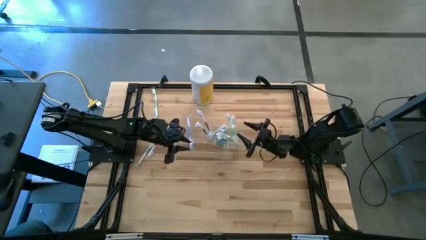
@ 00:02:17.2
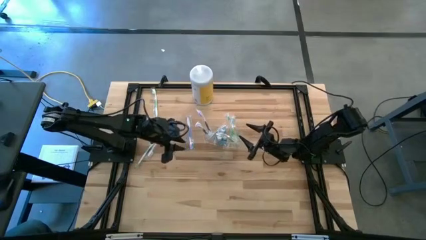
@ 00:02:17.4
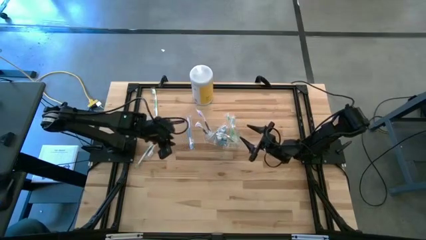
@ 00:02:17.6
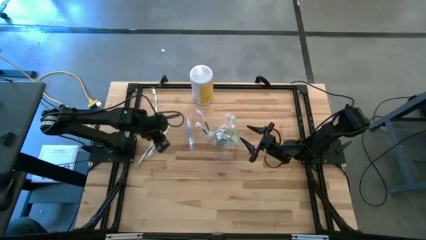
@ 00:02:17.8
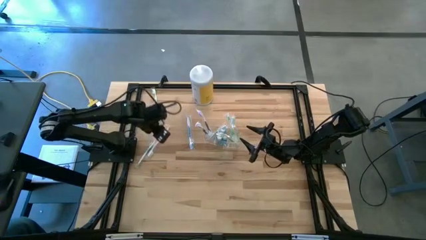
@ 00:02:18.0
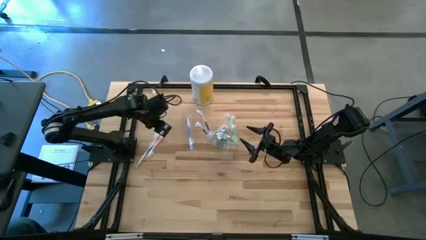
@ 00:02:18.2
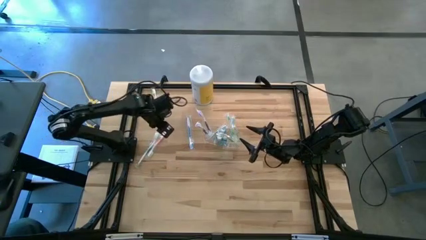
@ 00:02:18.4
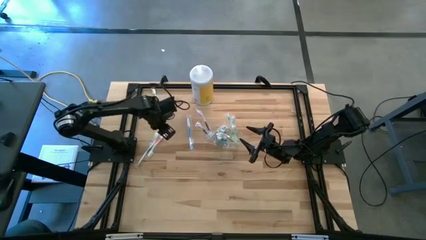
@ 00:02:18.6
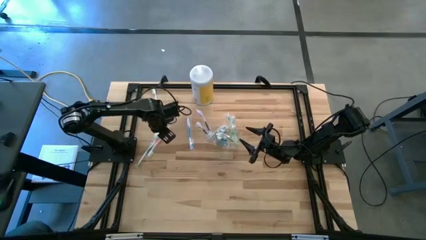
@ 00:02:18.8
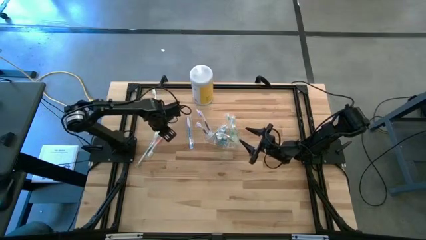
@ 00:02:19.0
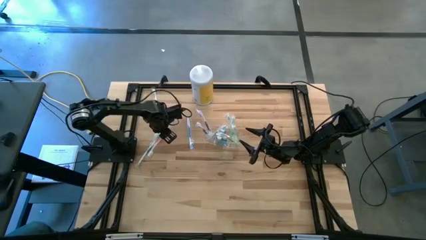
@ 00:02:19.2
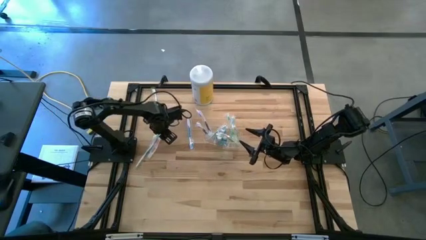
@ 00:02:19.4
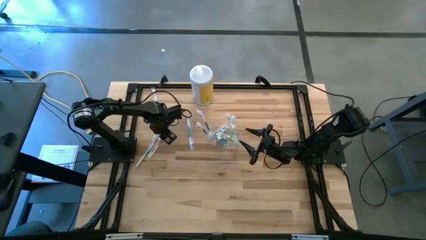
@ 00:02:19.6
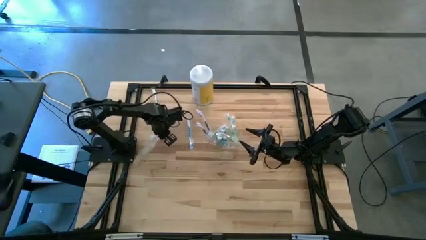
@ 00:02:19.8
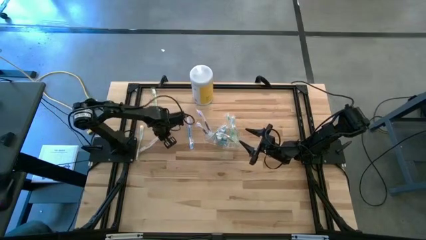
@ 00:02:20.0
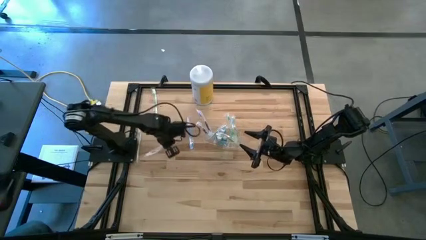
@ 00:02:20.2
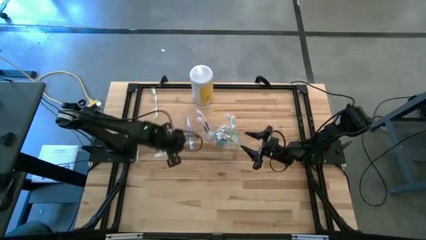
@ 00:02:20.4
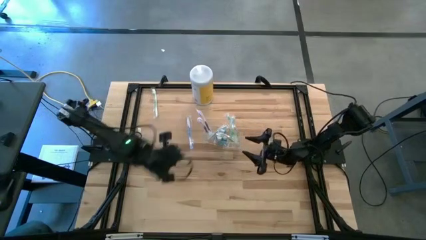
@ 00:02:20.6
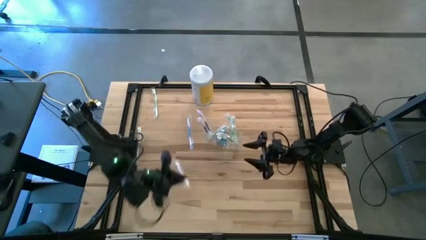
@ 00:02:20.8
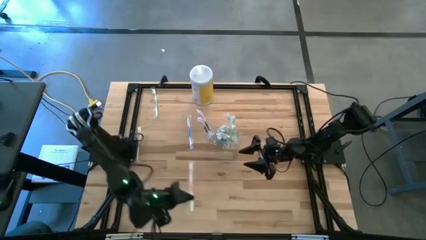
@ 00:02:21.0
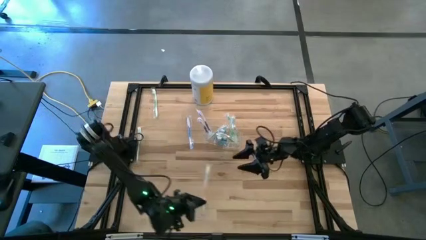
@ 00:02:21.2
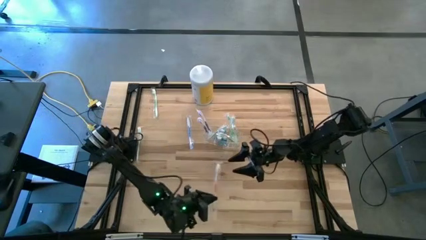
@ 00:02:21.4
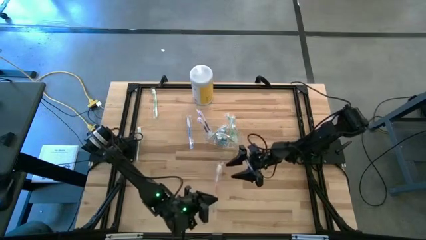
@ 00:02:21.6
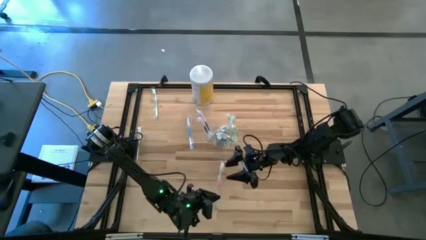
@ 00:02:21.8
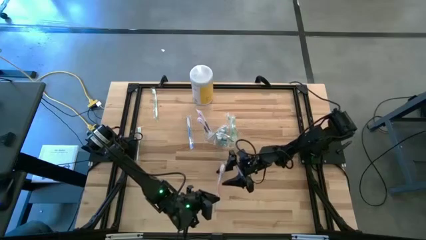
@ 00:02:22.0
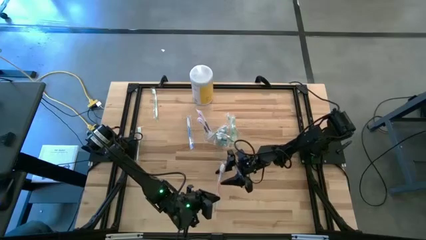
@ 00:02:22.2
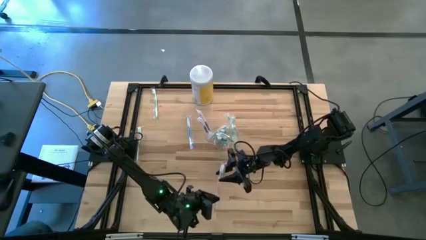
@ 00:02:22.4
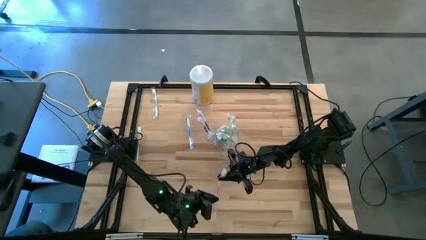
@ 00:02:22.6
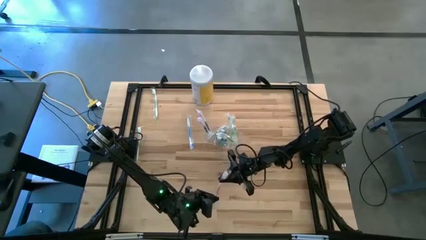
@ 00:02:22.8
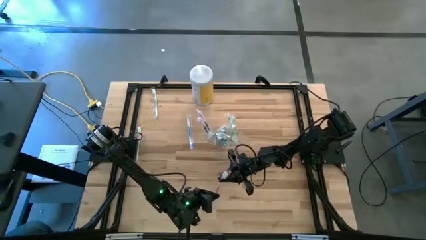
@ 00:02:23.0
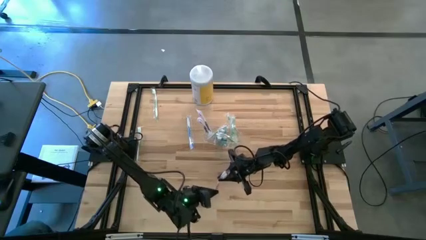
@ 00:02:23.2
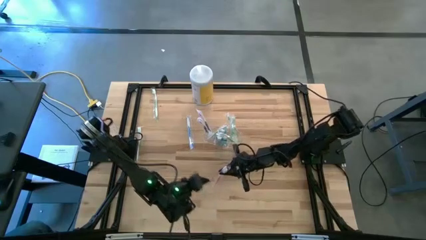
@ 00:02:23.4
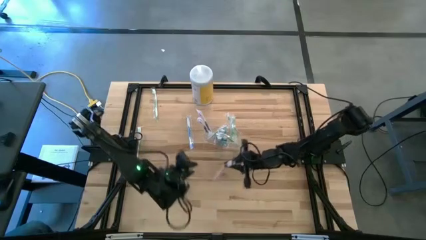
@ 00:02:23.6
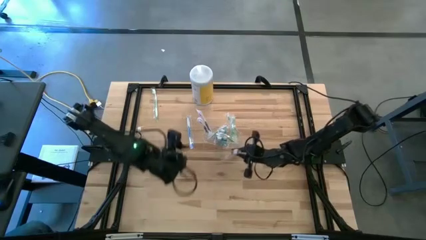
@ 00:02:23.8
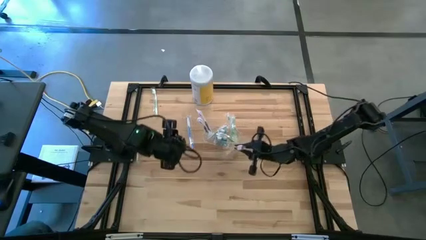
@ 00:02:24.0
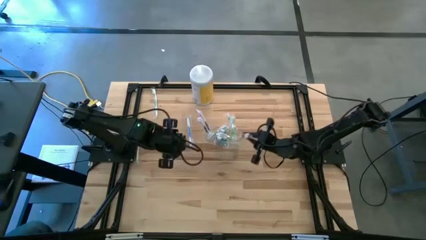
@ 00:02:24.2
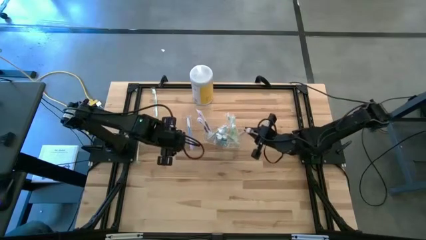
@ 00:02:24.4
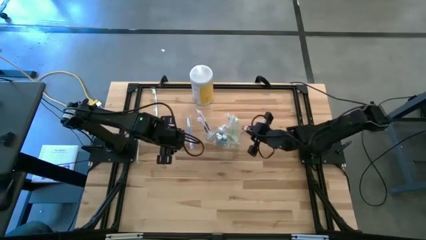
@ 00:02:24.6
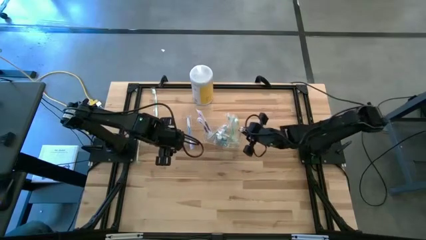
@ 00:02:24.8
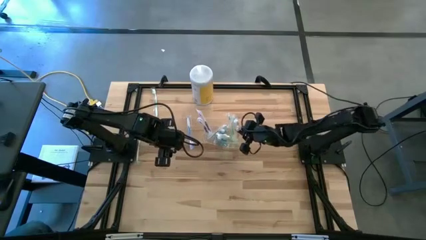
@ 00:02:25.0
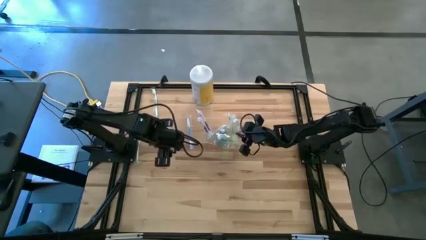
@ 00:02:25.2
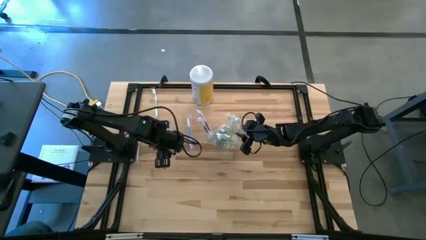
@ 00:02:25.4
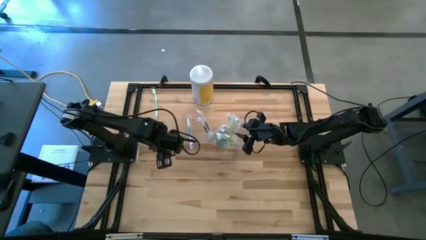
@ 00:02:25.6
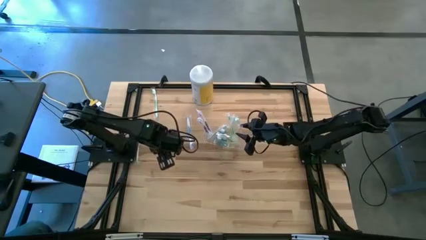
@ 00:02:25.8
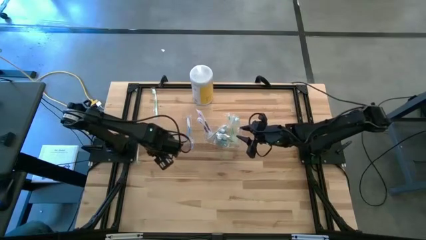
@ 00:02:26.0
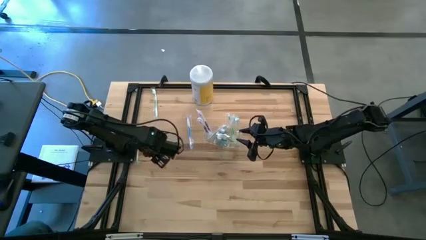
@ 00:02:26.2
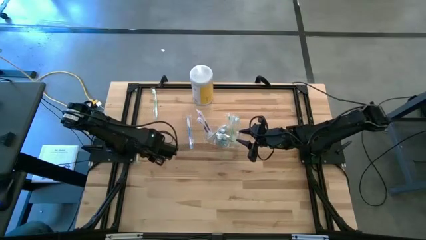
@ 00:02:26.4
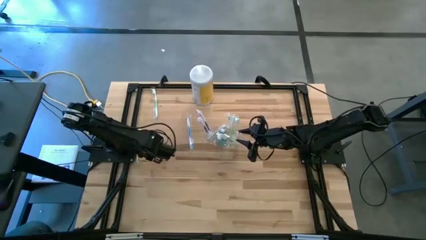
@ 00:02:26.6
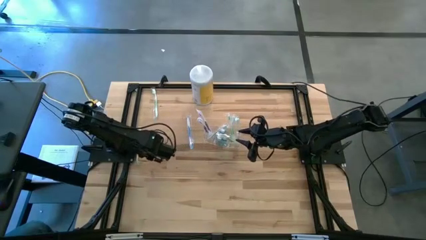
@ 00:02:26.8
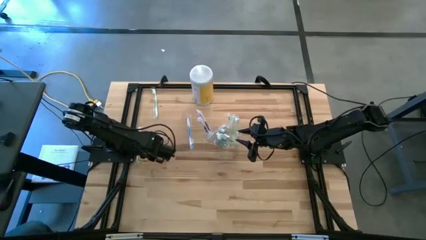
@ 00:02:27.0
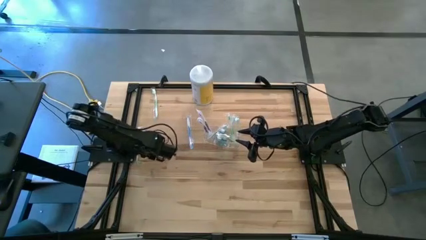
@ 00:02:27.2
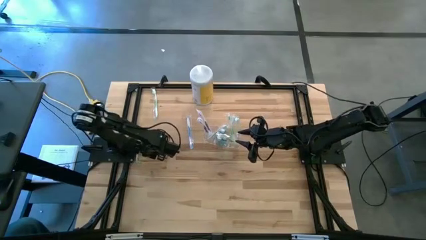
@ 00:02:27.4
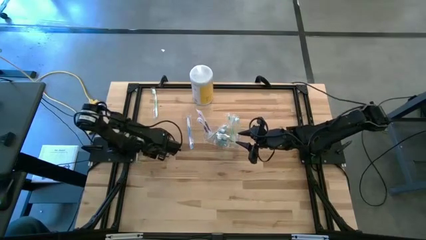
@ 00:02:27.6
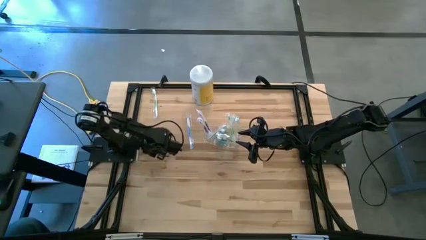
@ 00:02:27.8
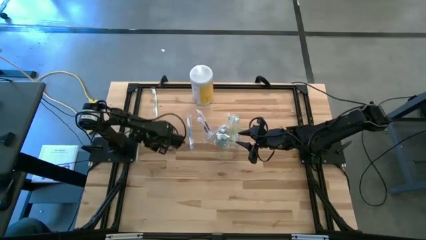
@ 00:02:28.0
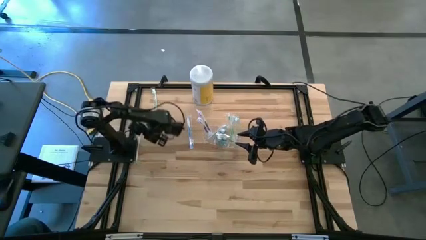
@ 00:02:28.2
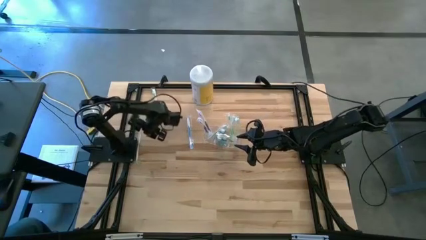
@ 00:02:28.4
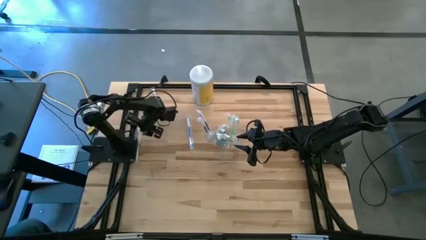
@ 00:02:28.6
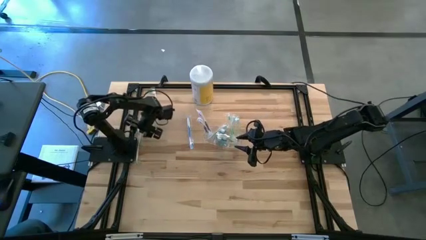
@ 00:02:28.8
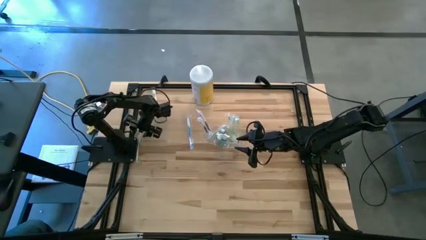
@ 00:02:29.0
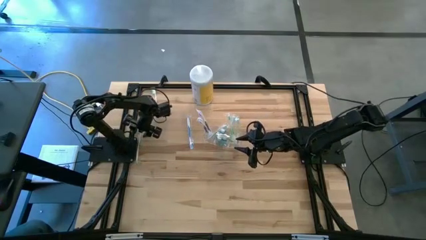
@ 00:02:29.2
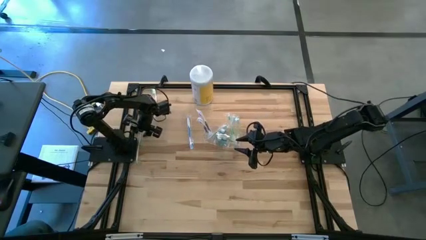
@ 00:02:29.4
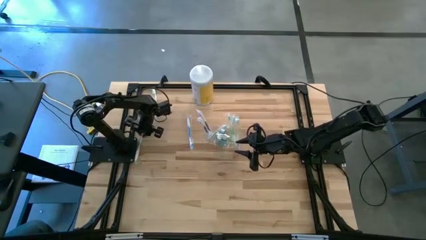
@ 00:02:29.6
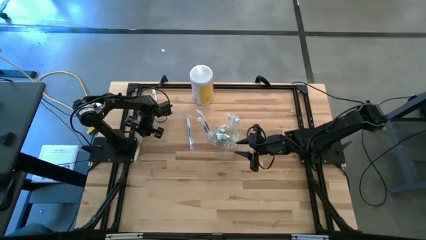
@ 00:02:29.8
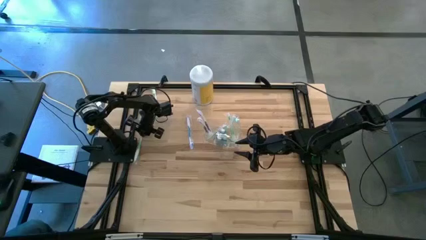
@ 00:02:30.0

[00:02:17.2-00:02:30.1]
Task: Pick & Place toothbrushing station
Put the orange toothbrush into the right section of the transparent organizer

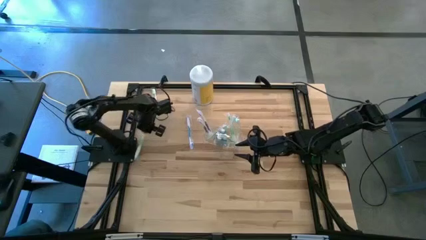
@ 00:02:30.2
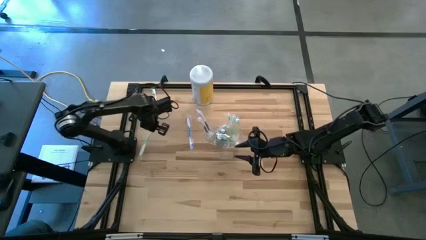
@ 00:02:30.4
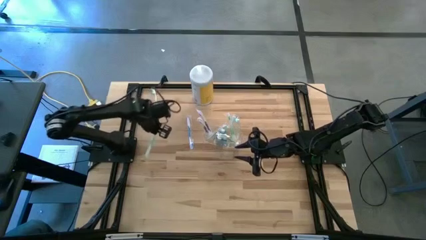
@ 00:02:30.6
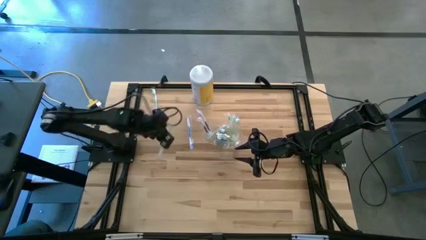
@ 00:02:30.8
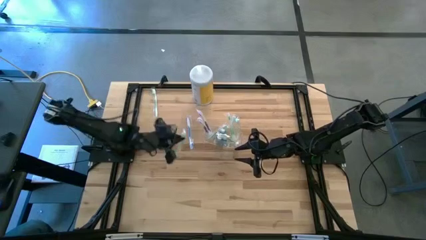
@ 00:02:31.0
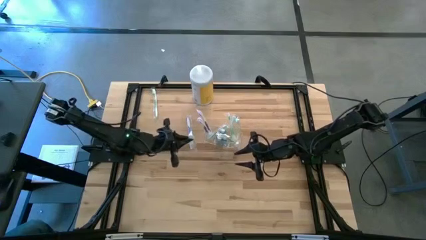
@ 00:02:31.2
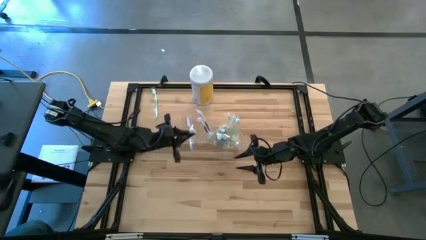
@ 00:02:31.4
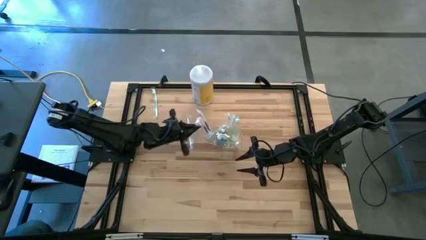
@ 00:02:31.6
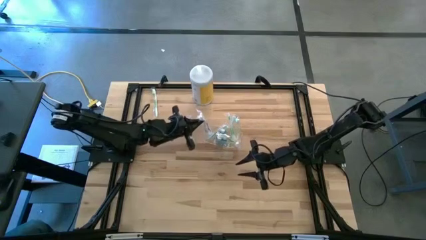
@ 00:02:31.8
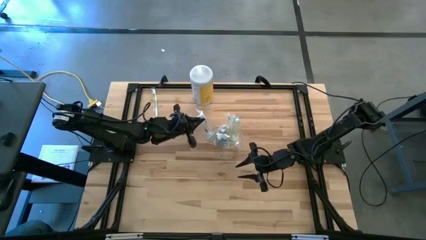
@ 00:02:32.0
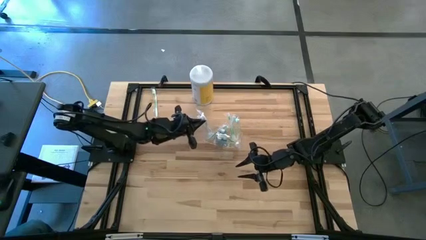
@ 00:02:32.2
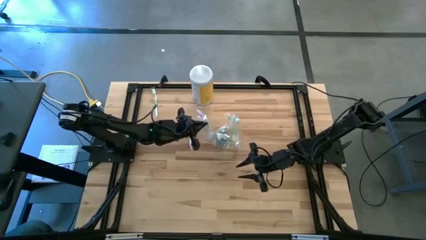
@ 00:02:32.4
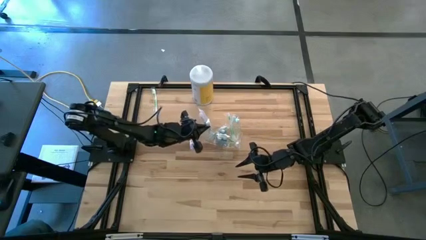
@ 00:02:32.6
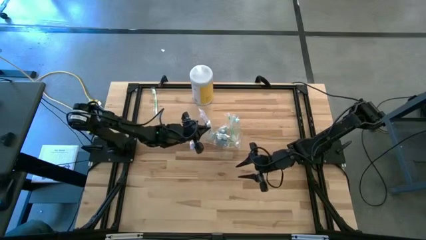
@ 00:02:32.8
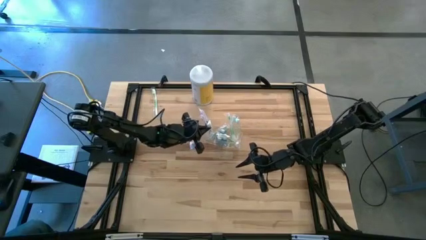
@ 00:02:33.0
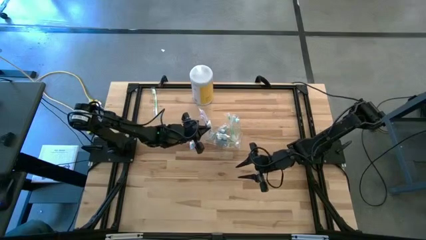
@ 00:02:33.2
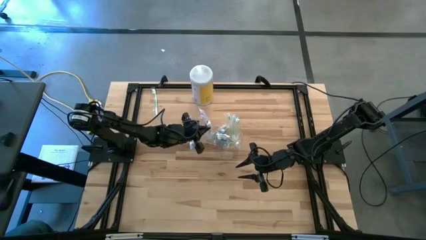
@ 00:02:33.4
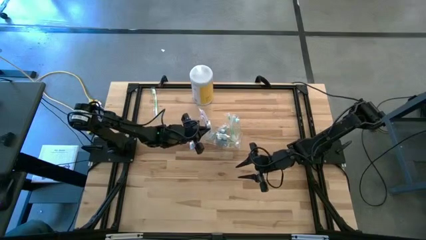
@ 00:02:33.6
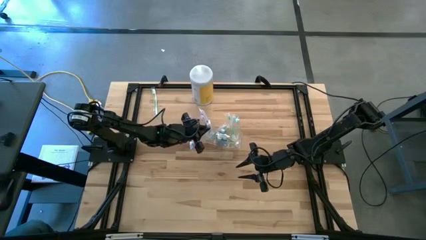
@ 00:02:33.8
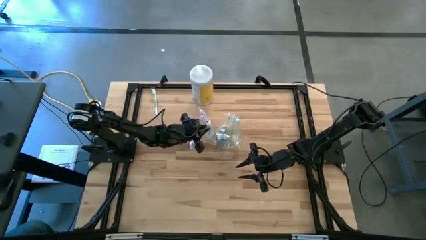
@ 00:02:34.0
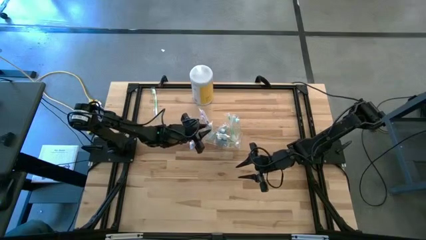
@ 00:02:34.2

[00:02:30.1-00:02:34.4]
Put the bottom green toothbrush into the left section of the transparent organizer
